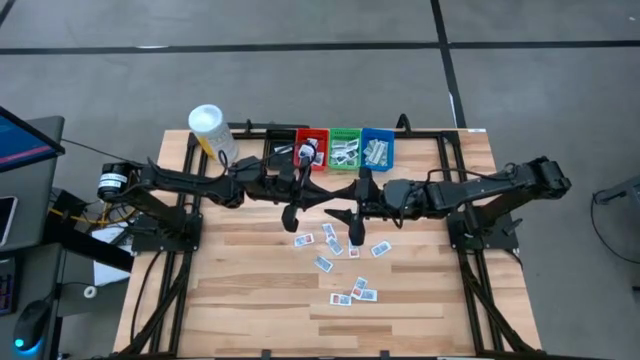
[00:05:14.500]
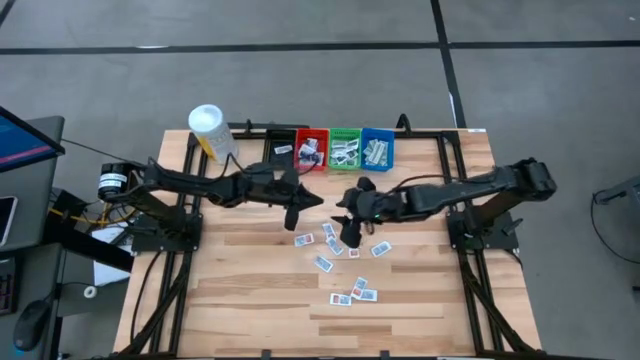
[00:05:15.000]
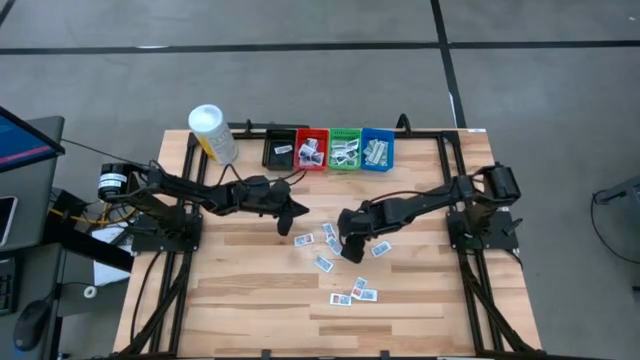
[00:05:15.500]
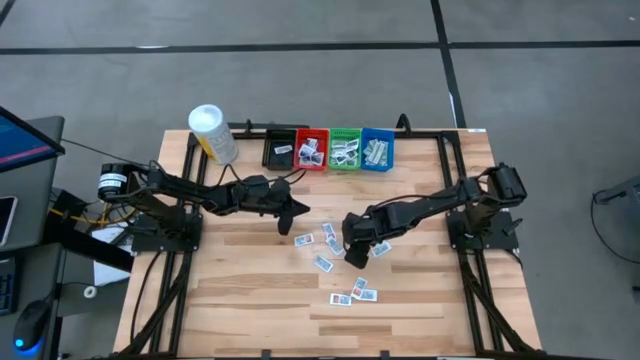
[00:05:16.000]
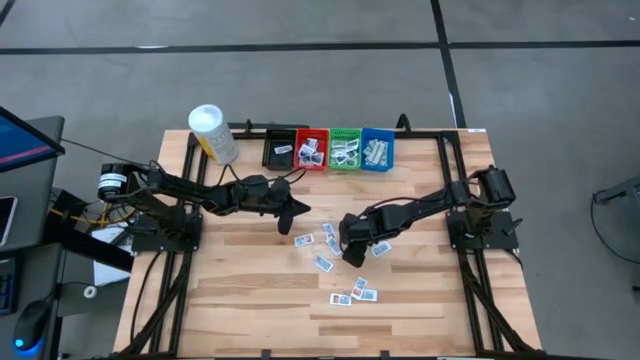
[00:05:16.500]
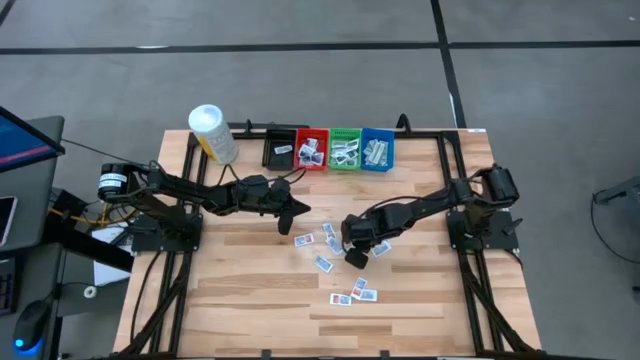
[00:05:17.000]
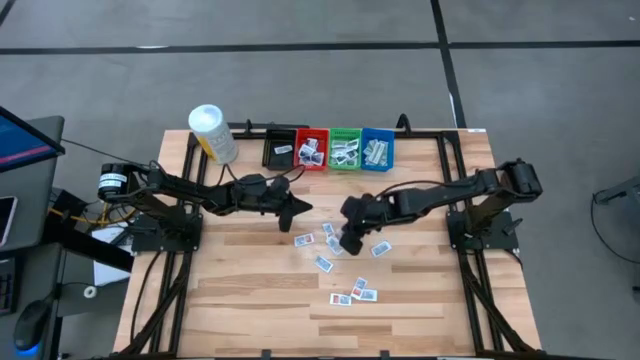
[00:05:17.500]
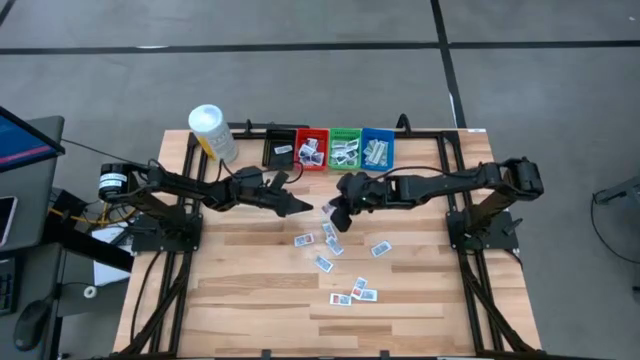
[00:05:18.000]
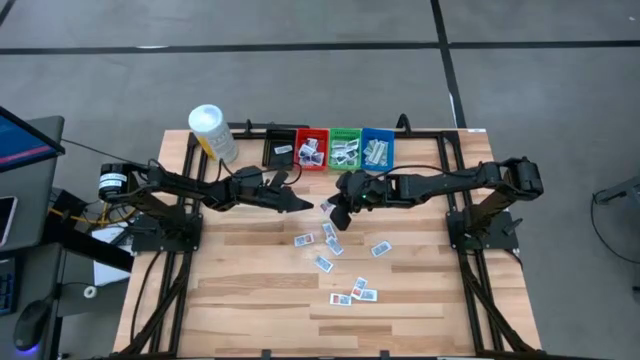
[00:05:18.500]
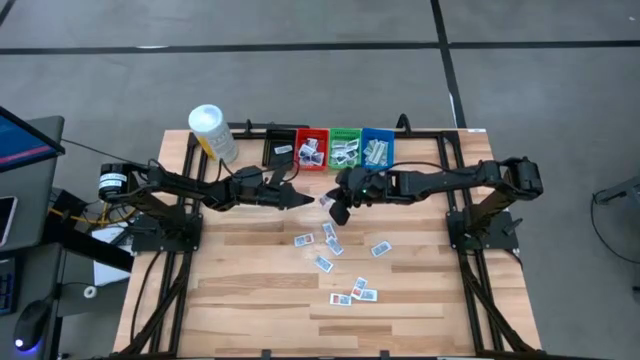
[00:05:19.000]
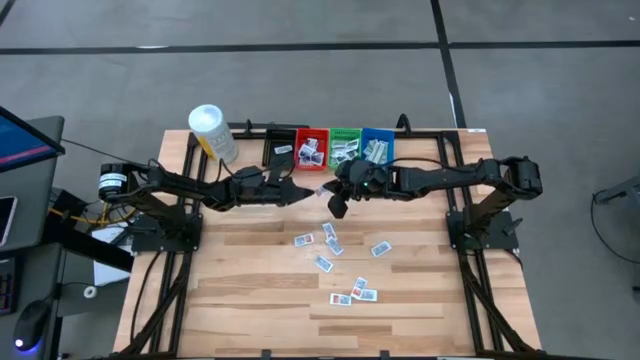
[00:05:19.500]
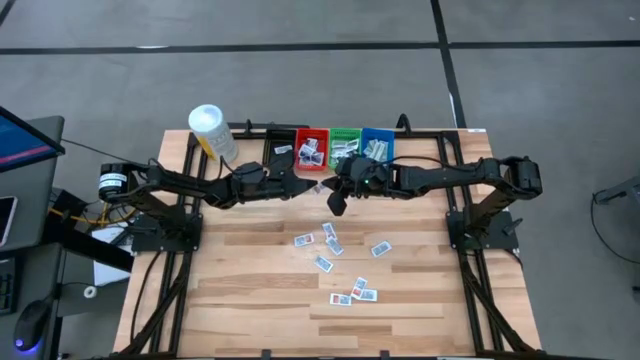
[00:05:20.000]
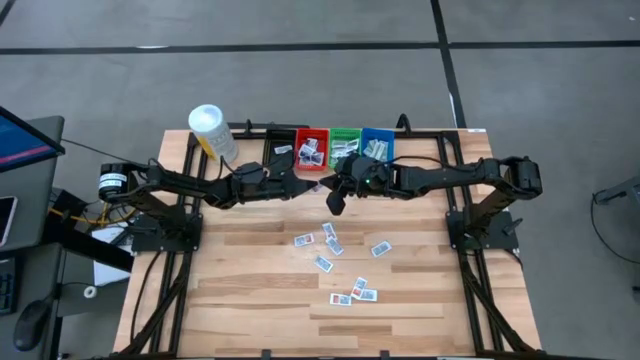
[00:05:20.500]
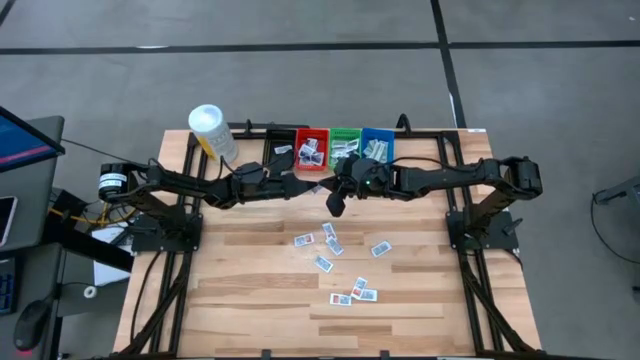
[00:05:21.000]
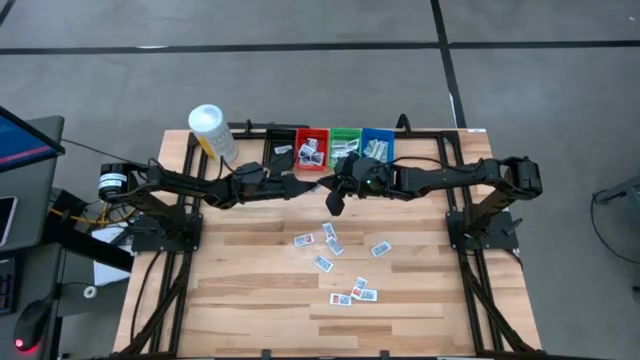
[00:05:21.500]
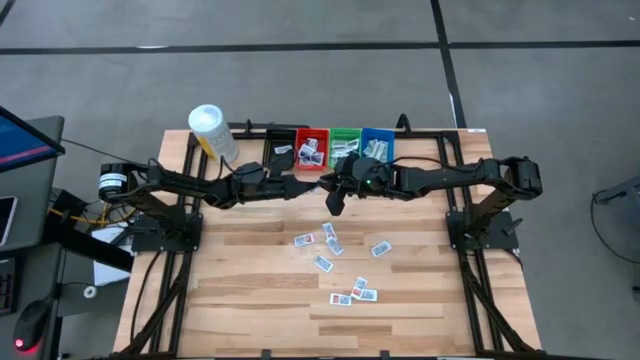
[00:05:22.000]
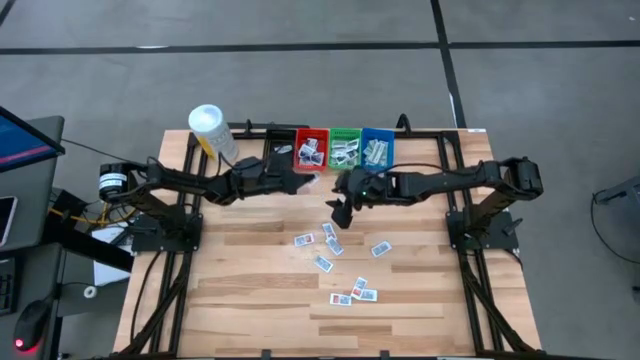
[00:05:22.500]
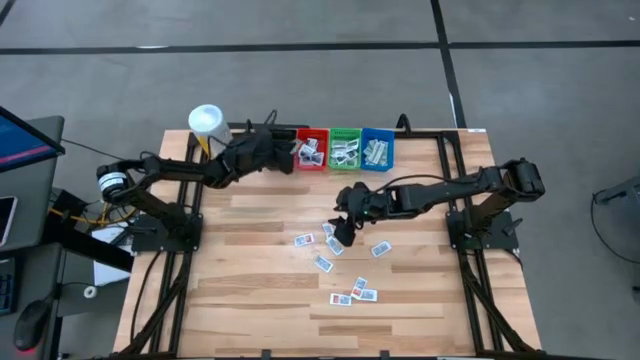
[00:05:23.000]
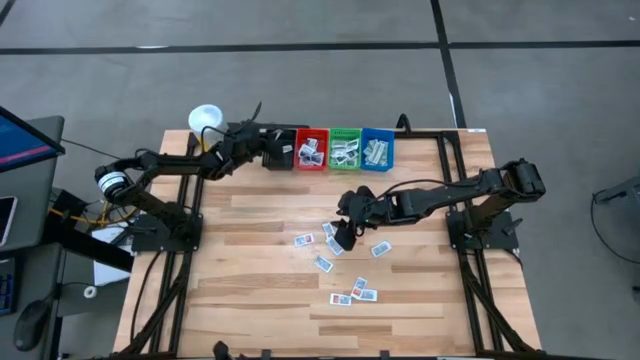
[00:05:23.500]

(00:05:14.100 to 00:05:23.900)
Task: Pick & Place First Aid Supplies
Put the ointment pack into the black bin

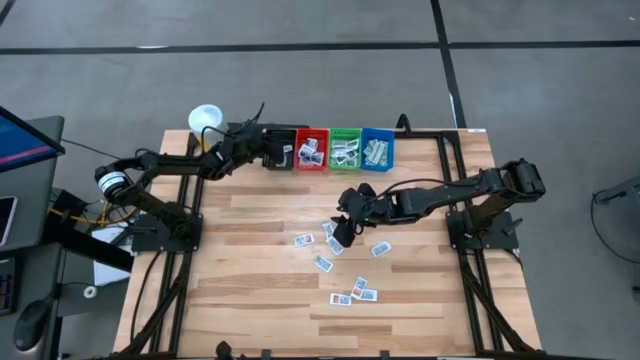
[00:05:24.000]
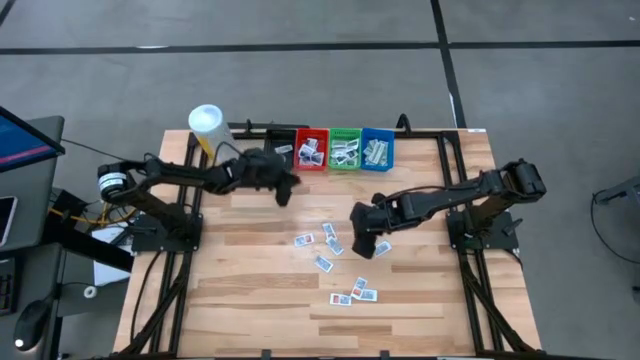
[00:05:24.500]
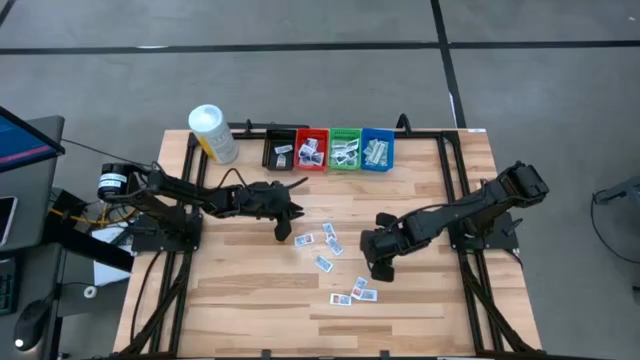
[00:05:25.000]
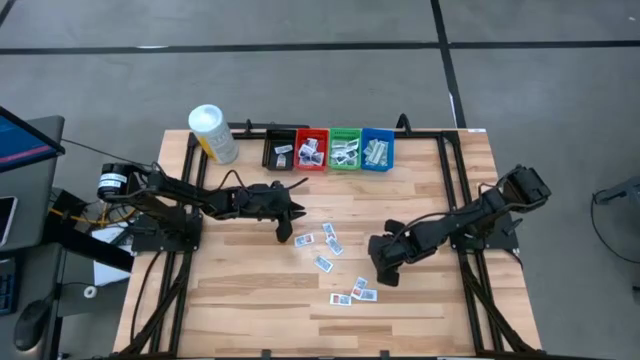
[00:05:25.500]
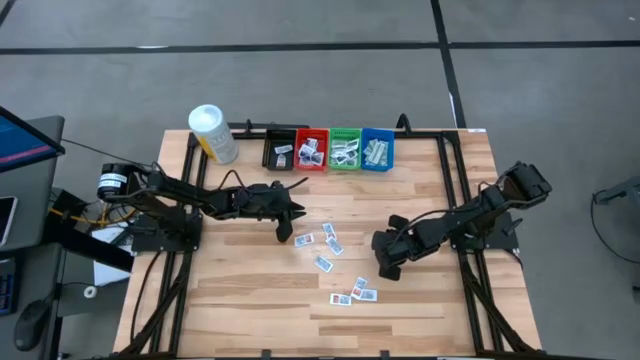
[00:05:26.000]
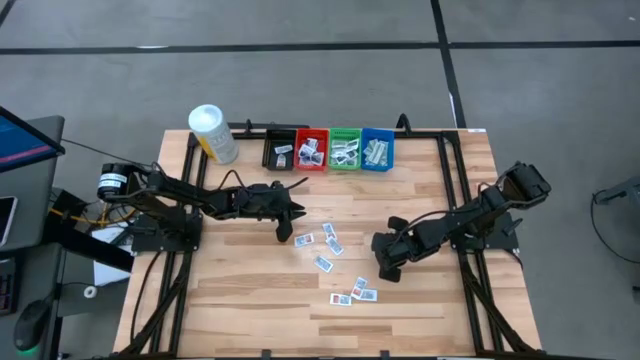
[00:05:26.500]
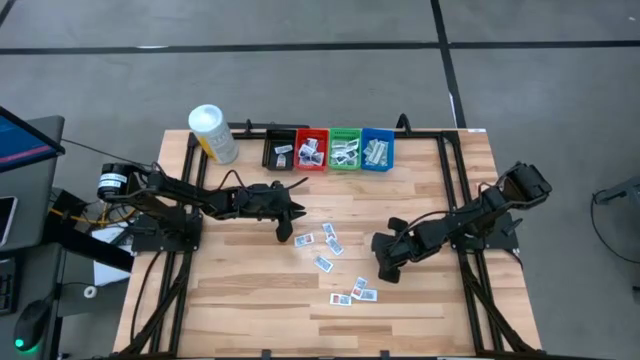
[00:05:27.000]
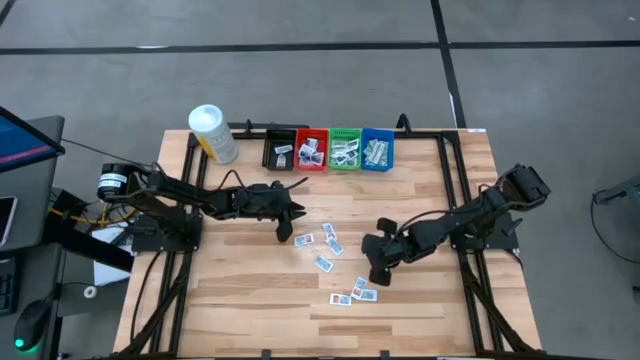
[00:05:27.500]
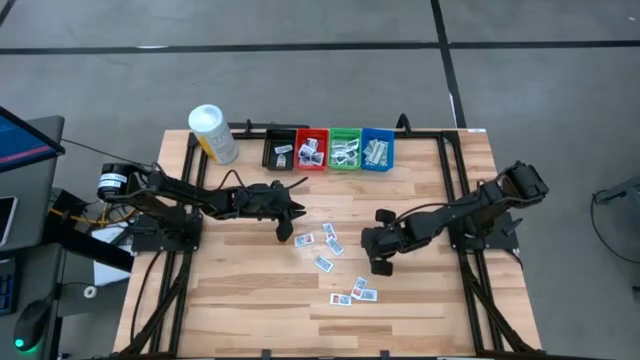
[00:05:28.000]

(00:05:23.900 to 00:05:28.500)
Put the ointment pack into the black bin

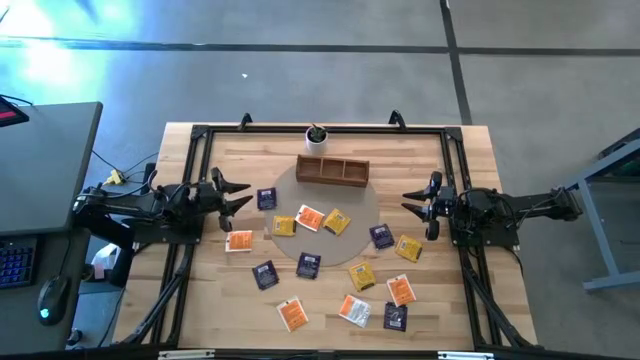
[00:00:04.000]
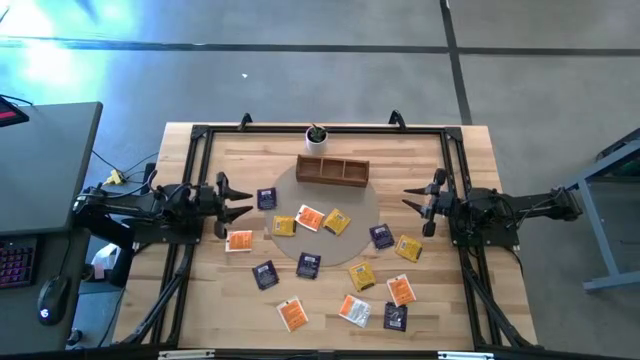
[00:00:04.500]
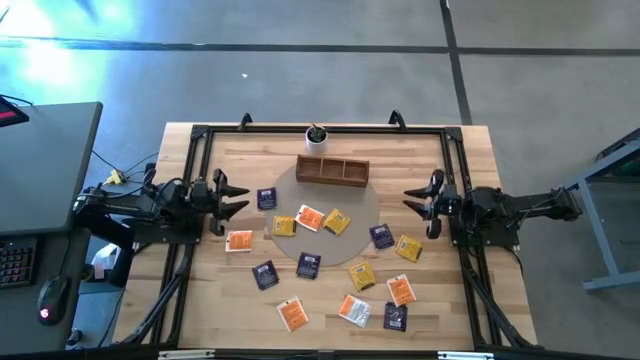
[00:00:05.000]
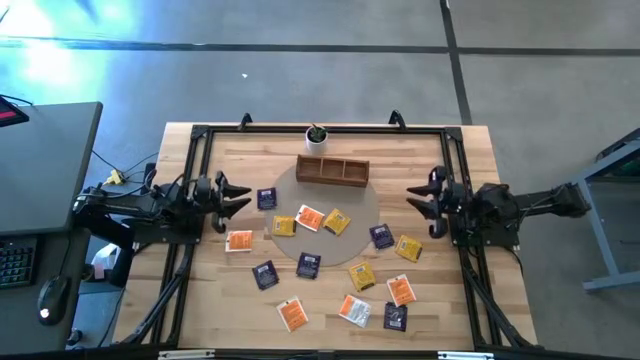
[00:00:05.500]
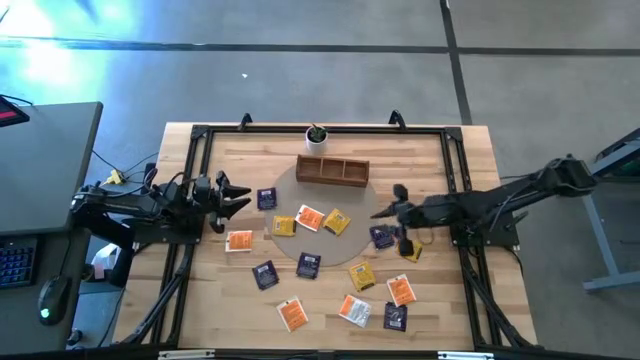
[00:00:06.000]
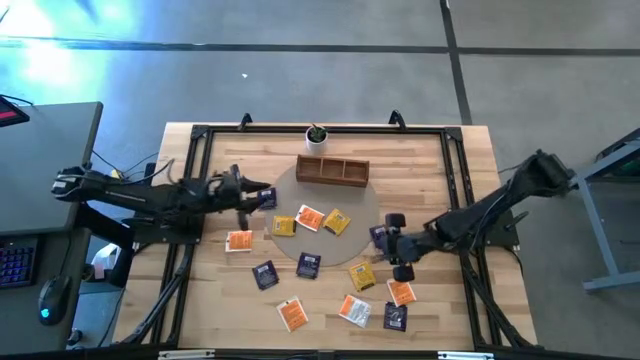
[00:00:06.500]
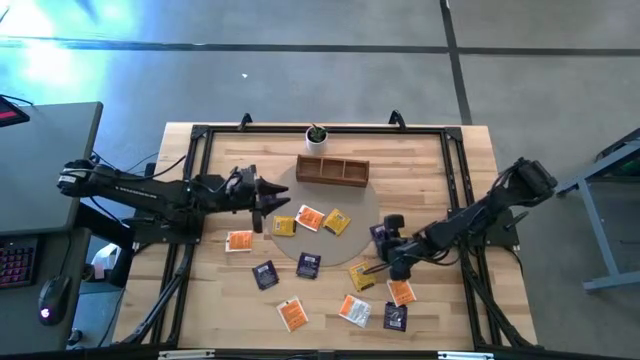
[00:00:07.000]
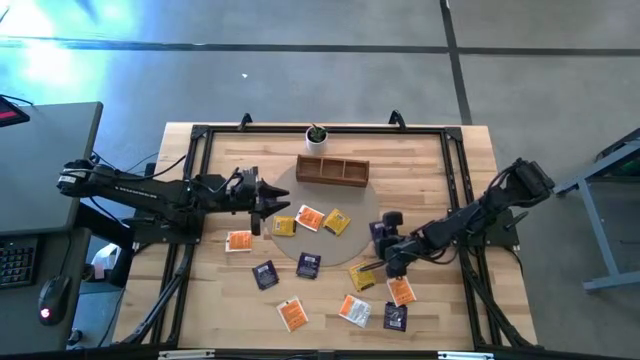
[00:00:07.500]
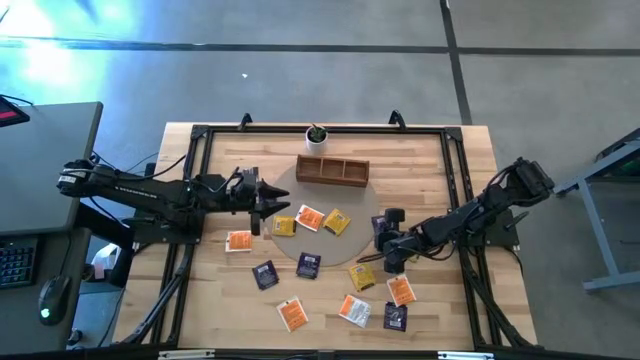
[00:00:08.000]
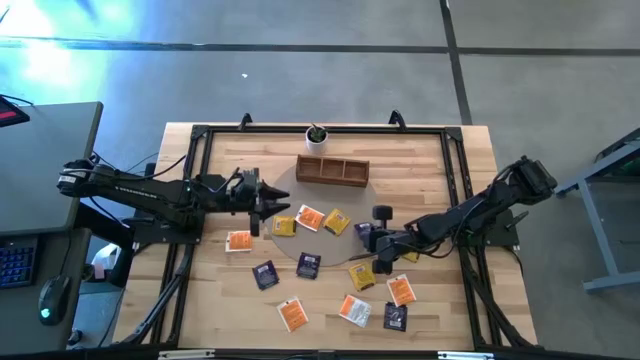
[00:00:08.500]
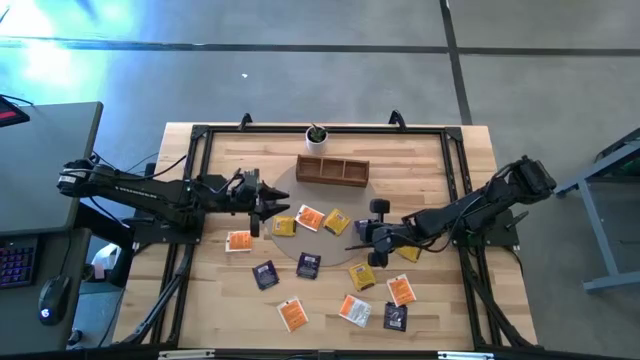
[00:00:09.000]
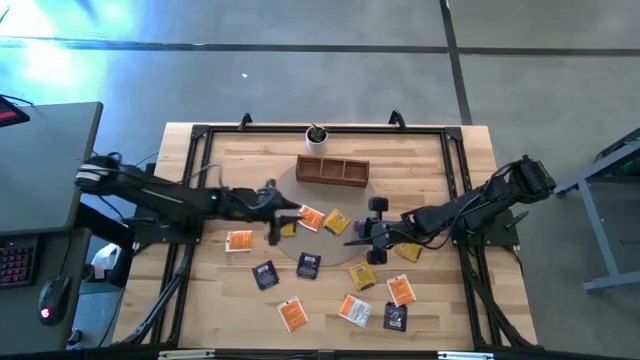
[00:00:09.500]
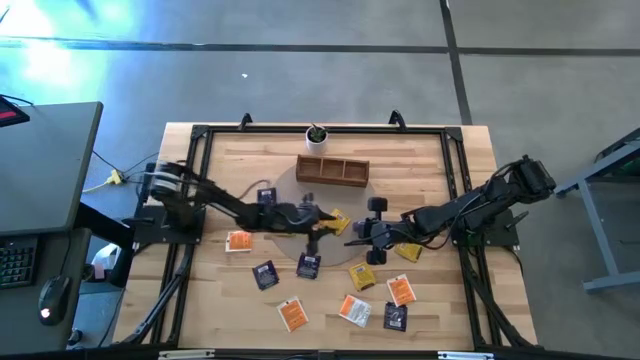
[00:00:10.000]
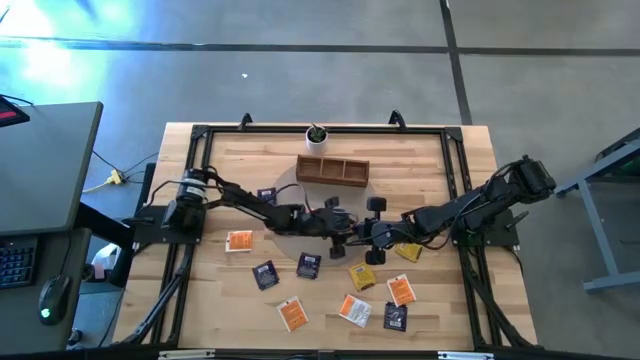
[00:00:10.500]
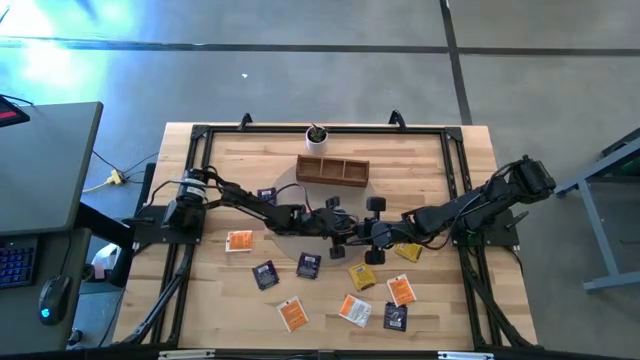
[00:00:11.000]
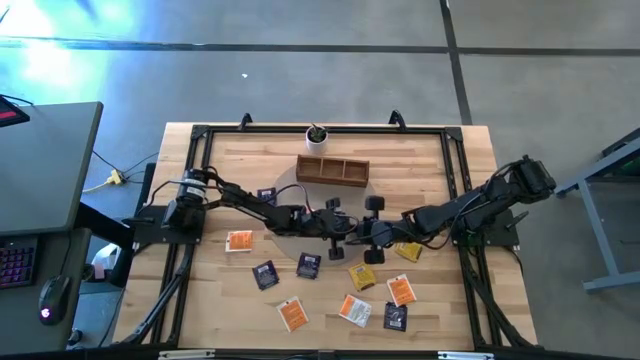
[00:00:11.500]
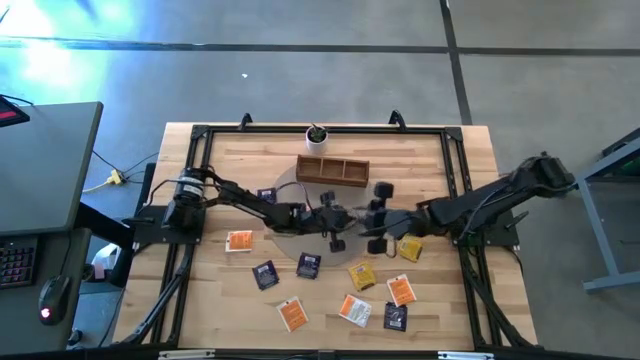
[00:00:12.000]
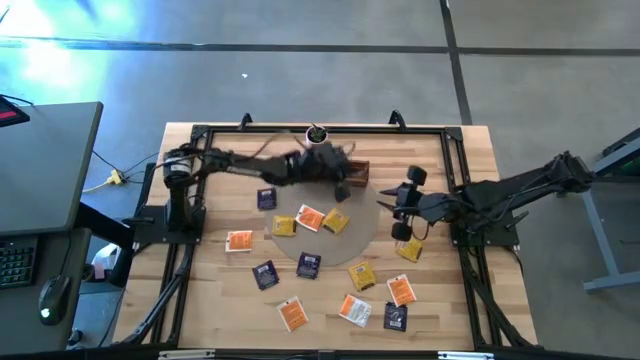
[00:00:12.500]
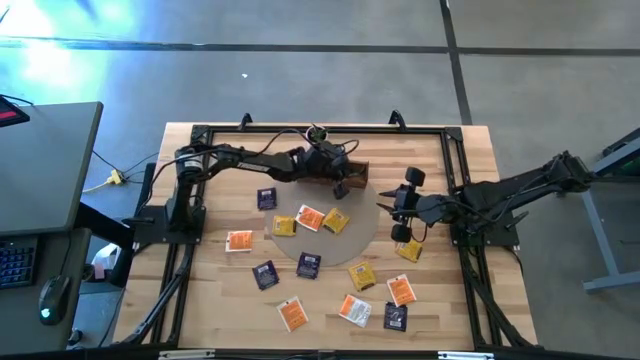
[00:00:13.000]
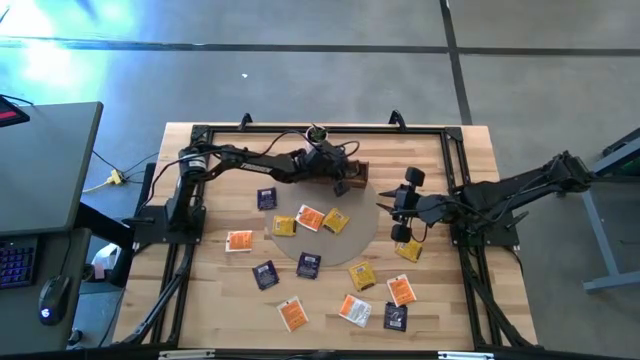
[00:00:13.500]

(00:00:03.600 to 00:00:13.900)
Task: Pick & Place Tea
Put the purple tea bag into the right section of the wooden organizer
